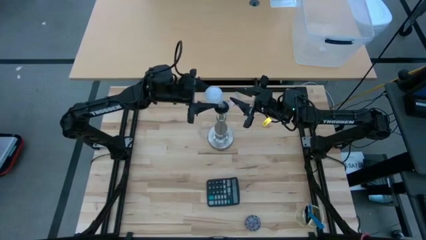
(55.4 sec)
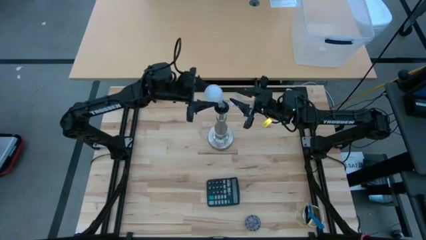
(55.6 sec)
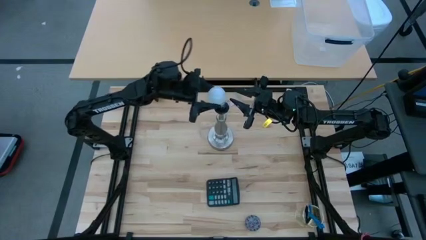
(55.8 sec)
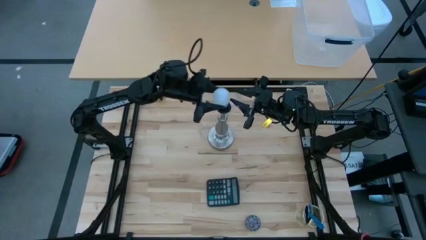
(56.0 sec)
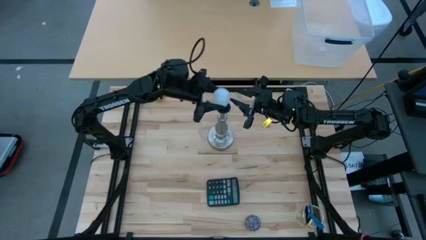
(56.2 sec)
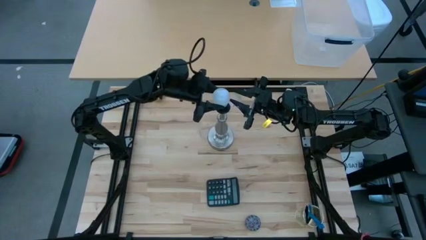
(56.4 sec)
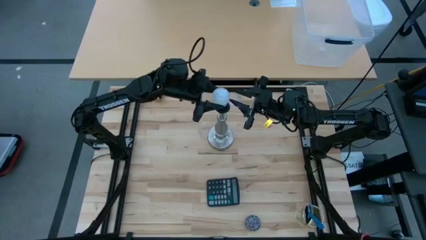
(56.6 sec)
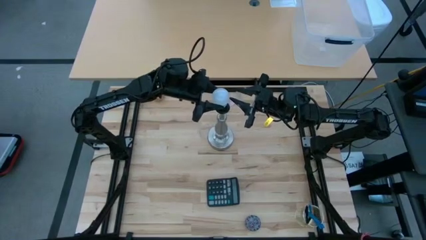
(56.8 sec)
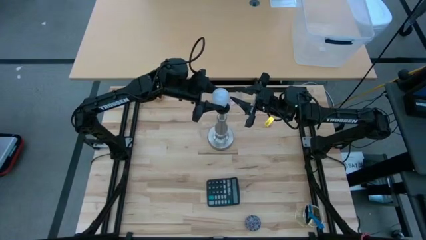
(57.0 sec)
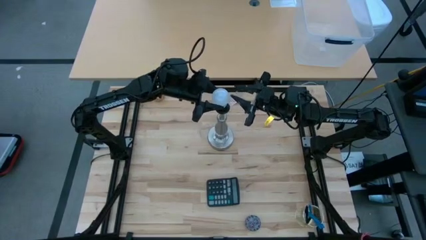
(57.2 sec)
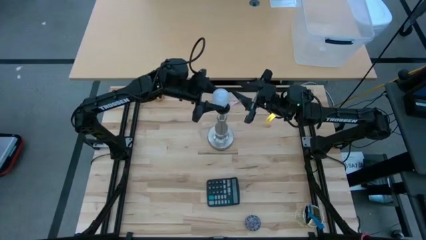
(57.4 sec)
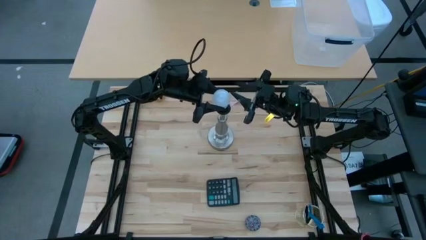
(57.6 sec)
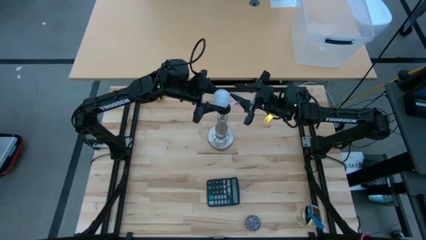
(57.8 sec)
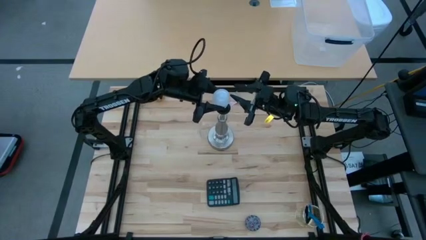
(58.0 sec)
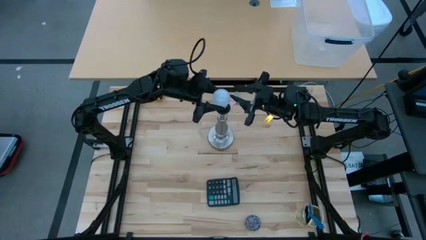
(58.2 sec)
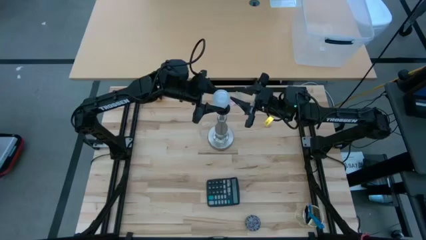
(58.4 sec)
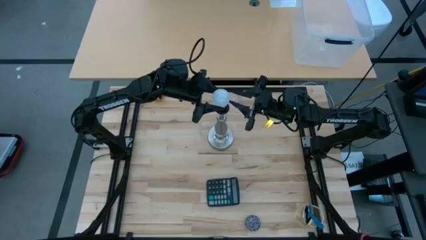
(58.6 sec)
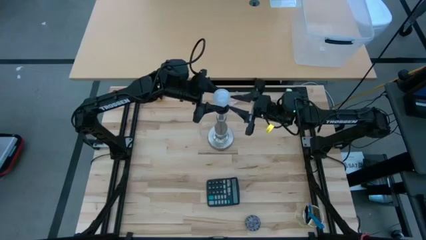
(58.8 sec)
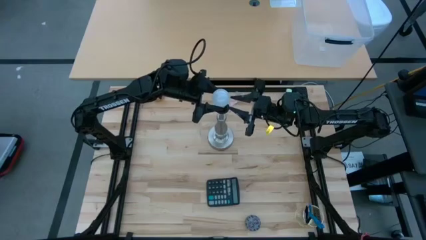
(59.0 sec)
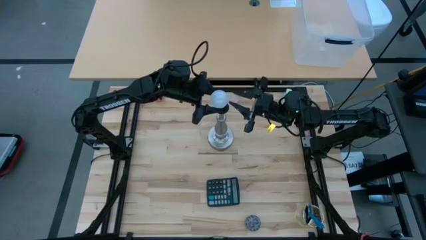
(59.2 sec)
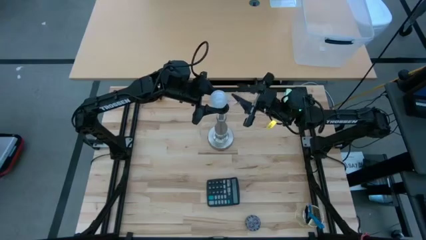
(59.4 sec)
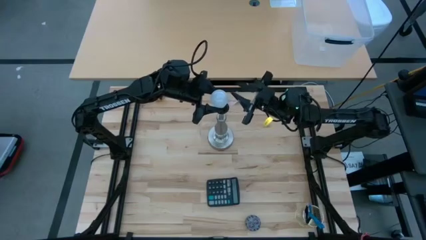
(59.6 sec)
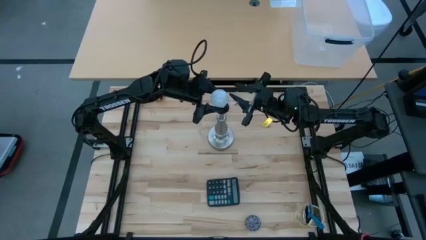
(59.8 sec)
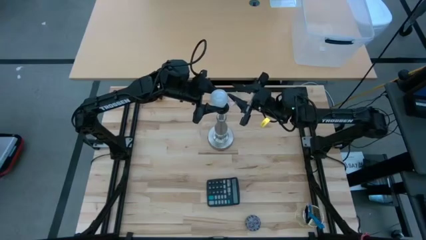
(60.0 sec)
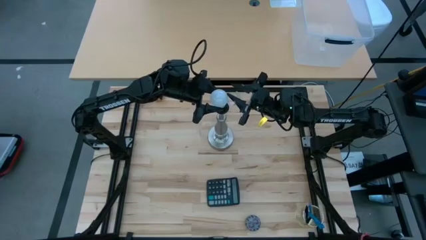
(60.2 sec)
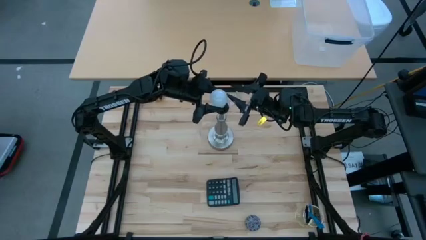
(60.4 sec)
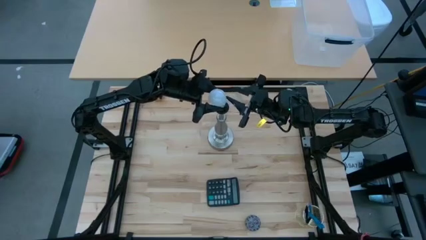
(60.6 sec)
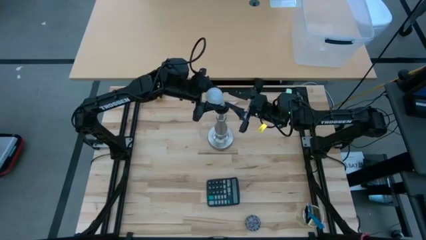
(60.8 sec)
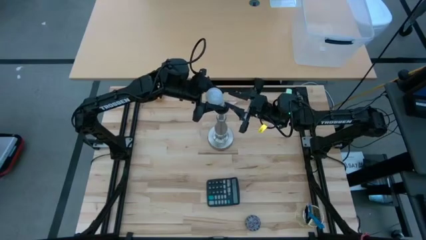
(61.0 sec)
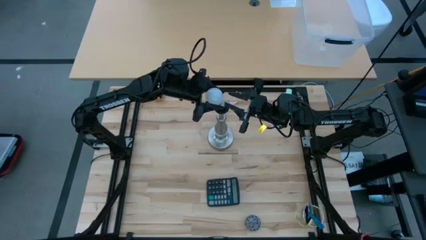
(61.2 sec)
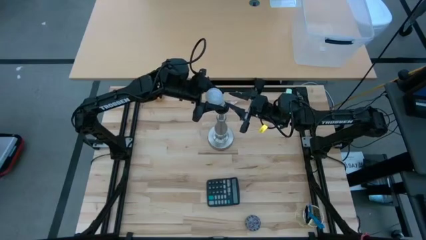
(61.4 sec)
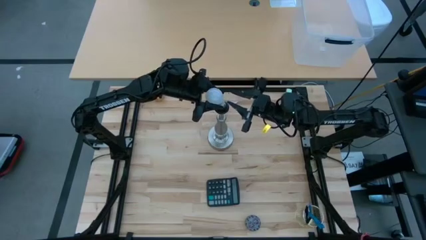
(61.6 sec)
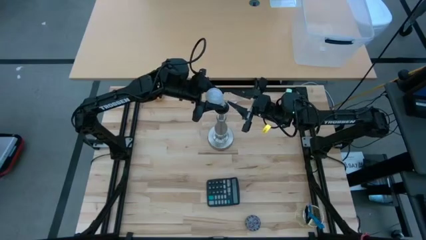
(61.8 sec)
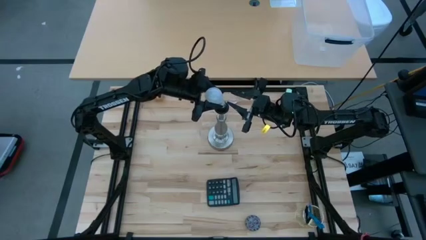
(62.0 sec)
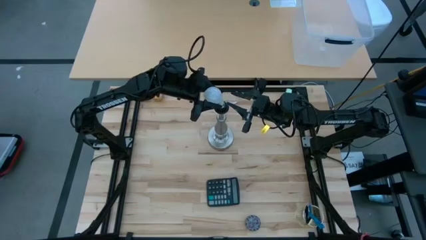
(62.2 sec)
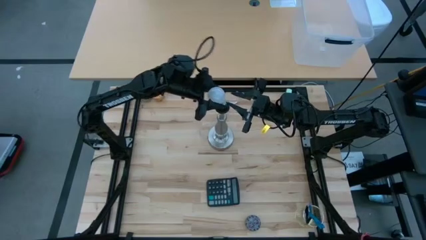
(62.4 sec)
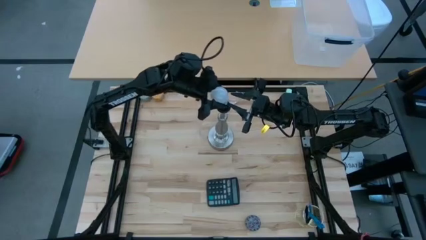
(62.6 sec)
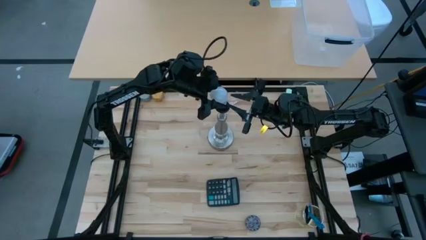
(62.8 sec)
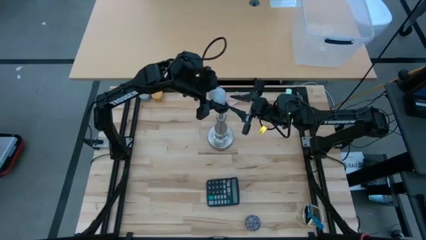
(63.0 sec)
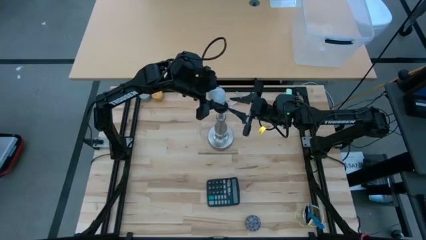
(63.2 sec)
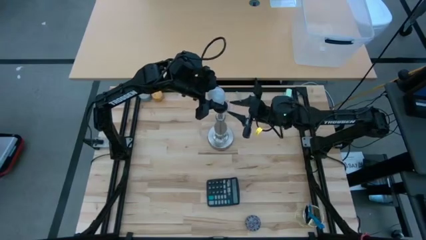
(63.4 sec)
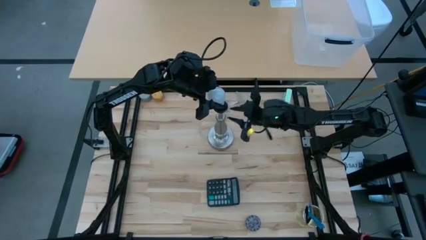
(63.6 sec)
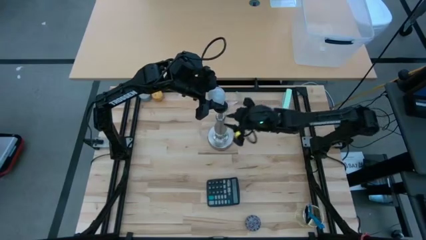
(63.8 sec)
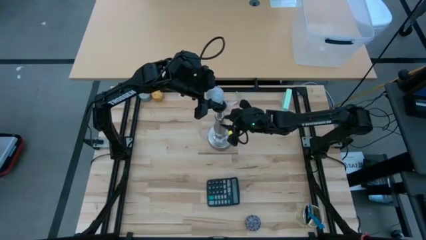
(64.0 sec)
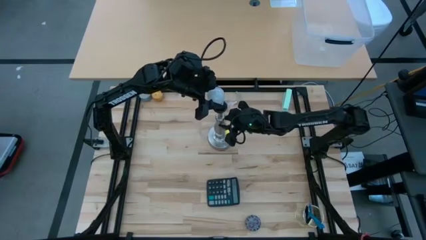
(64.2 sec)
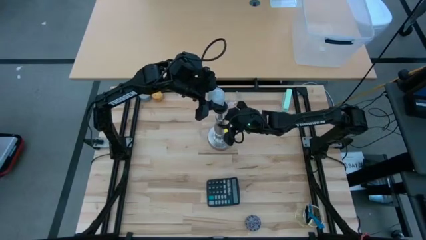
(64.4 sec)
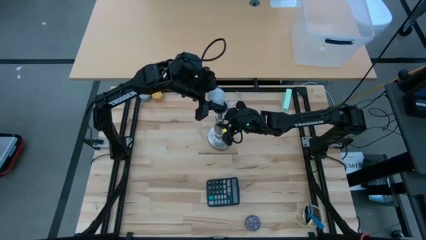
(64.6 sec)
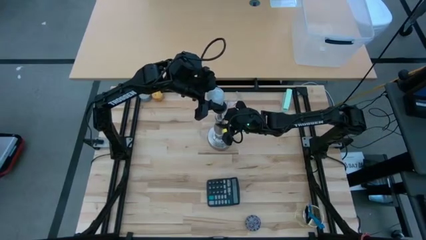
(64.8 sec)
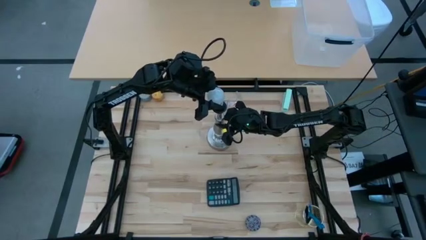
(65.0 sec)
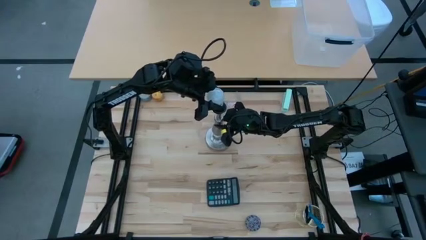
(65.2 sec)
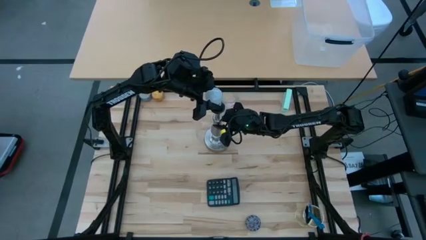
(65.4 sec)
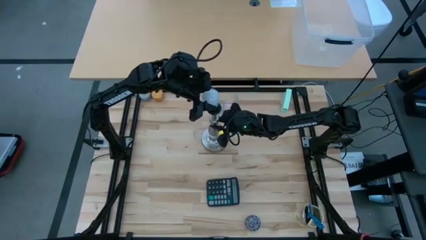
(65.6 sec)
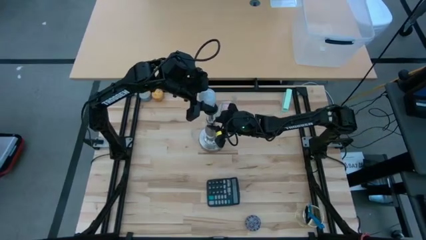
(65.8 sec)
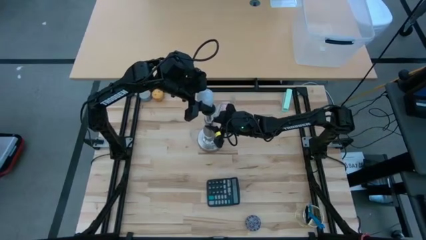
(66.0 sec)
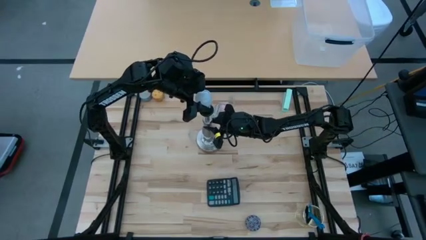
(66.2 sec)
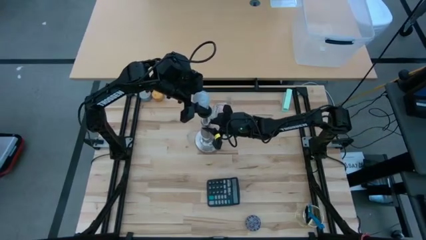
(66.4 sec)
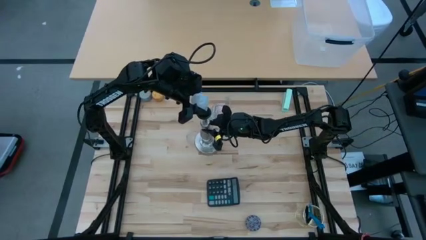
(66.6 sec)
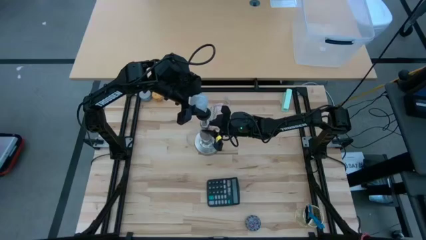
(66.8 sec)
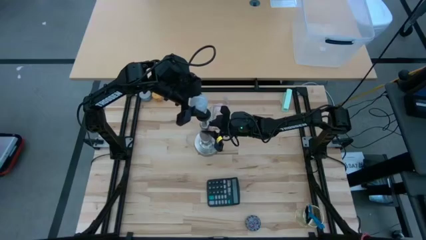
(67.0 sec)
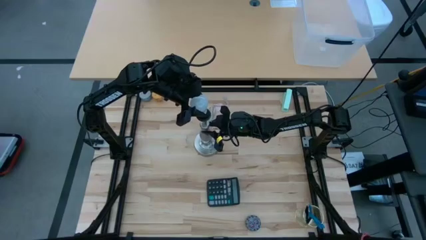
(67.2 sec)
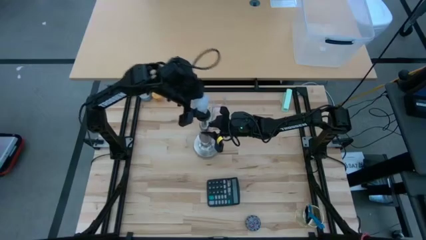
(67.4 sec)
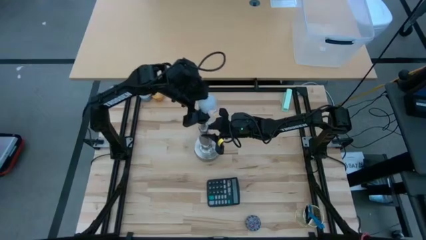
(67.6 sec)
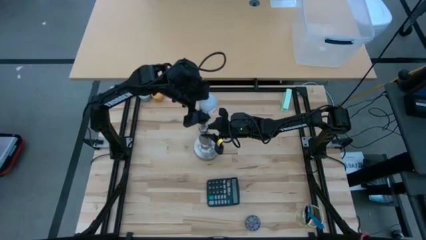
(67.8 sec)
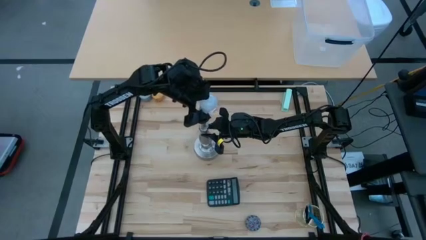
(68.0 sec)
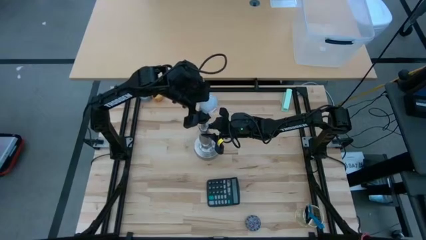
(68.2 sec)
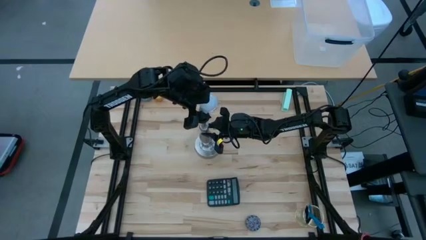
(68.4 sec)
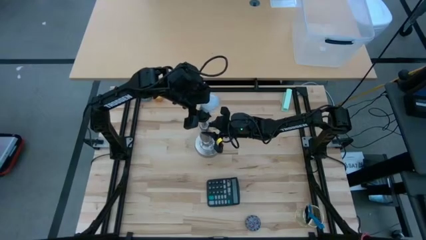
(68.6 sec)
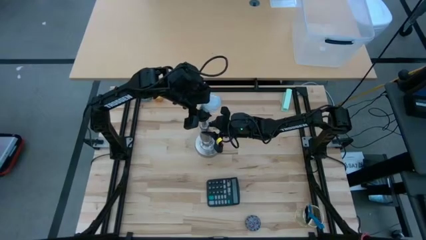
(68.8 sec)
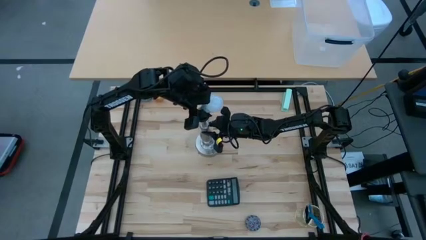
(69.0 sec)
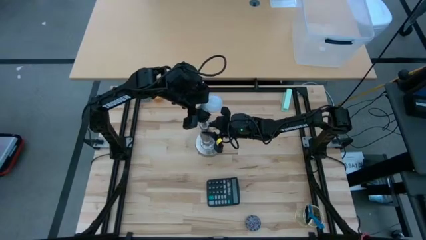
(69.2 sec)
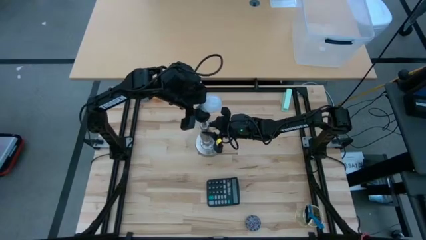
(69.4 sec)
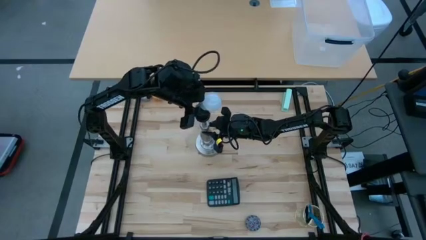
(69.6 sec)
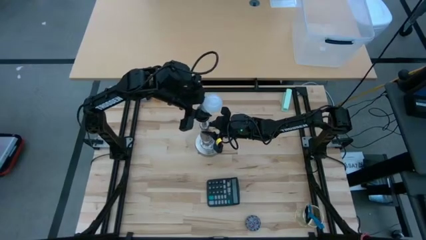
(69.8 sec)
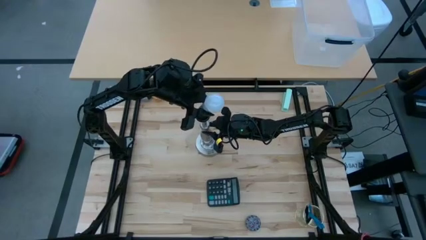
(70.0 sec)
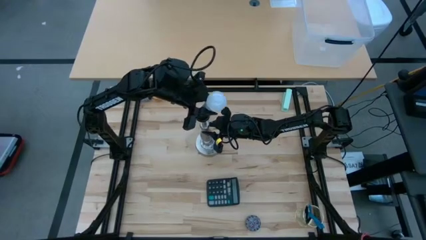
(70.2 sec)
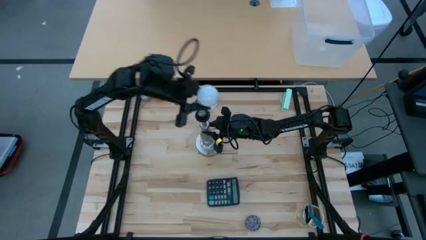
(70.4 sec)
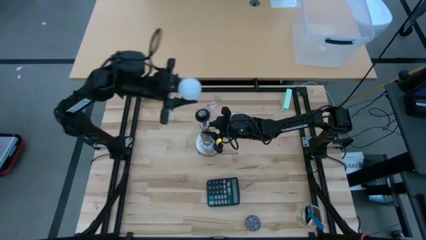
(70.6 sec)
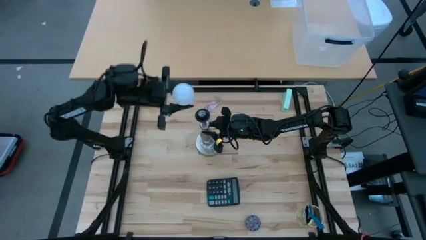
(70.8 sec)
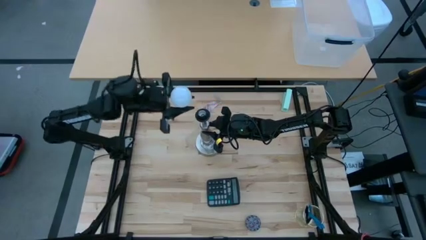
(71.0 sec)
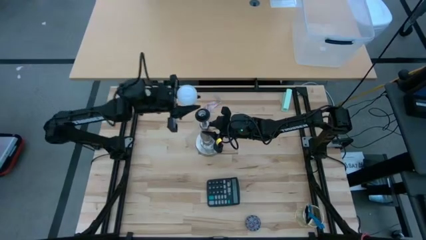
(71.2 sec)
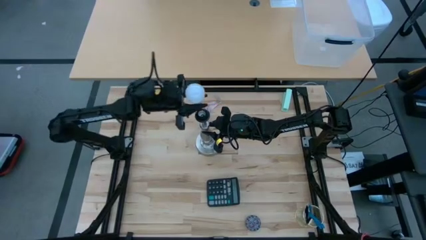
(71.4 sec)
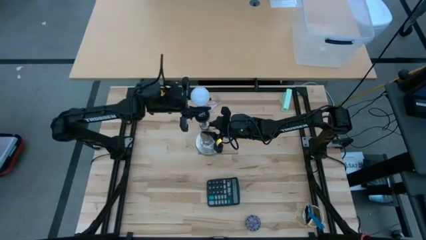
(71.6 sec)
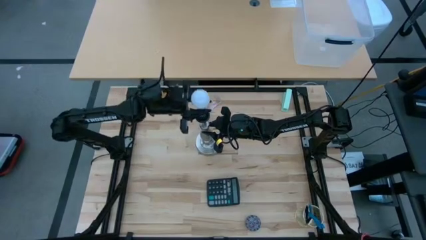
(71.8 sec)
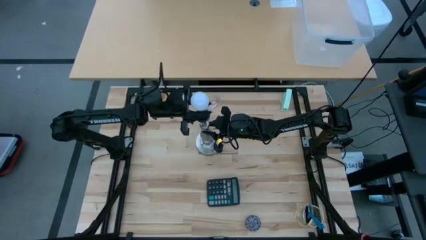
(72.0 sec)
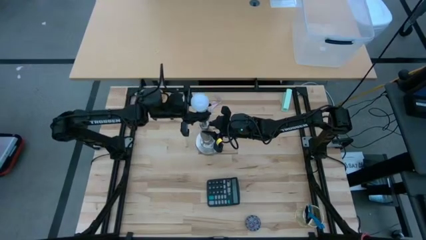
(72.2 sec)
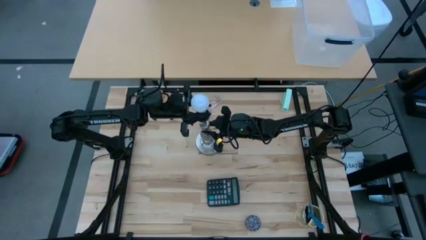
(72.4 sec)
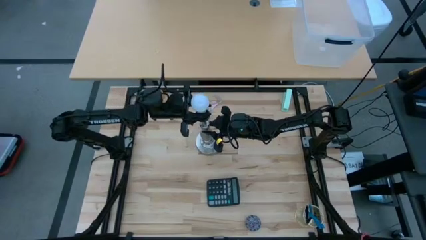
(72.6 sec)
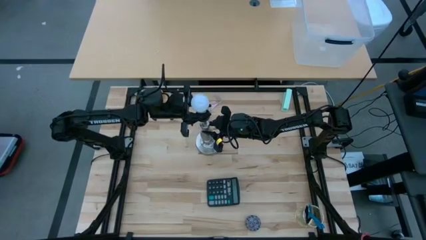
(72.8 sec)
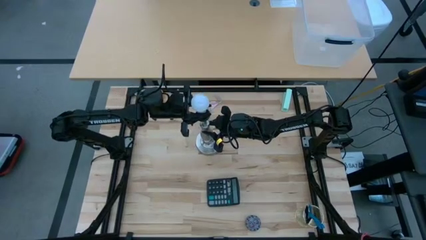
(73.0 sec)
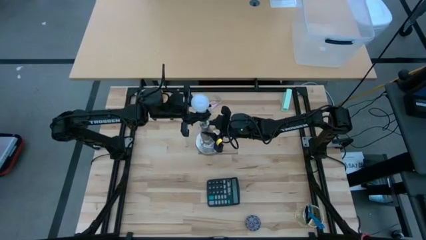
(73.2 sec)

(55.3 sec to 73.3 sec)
Task: Screw lightbulb
Insert the light bulb into the lamp
